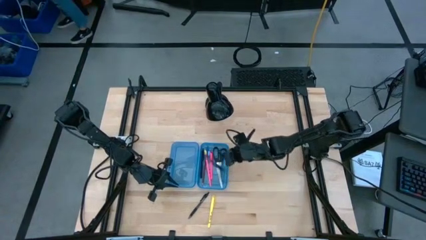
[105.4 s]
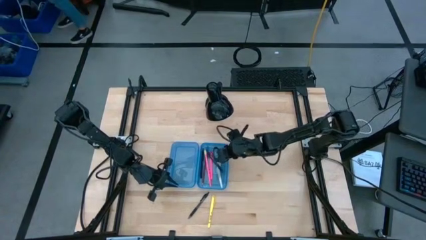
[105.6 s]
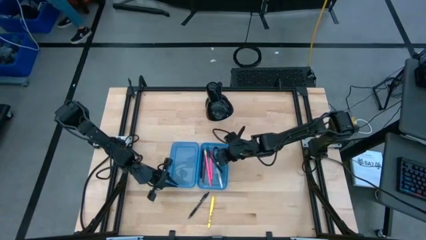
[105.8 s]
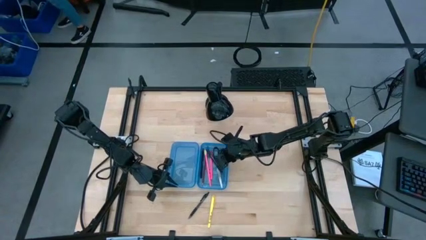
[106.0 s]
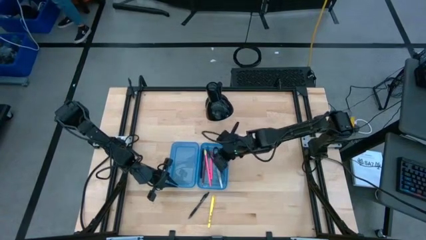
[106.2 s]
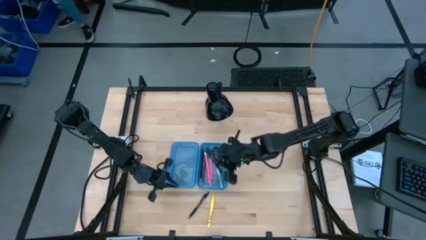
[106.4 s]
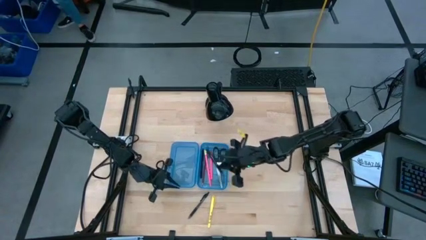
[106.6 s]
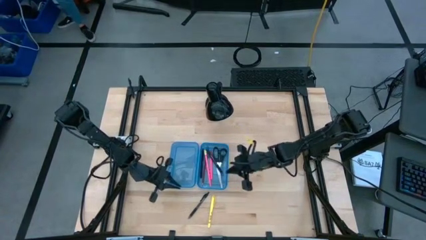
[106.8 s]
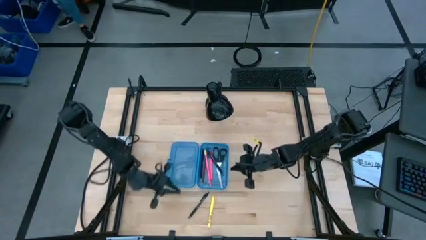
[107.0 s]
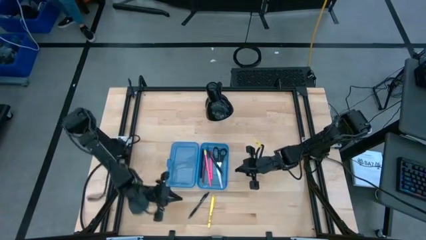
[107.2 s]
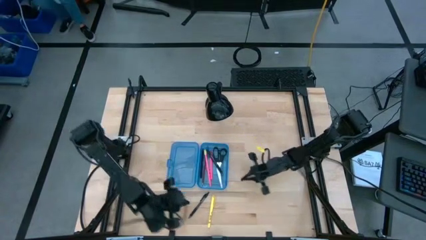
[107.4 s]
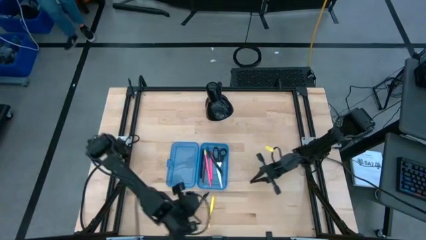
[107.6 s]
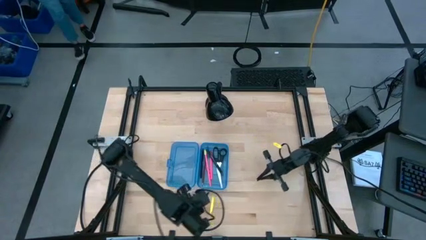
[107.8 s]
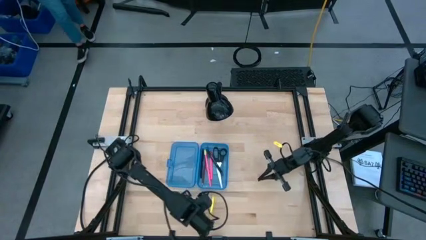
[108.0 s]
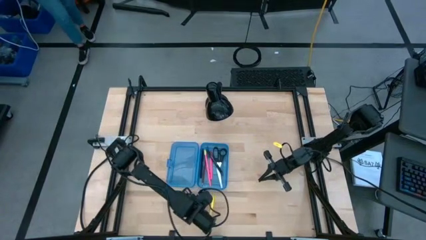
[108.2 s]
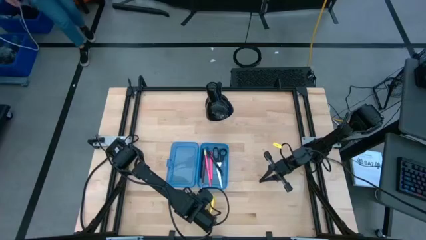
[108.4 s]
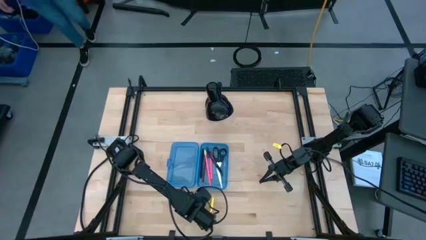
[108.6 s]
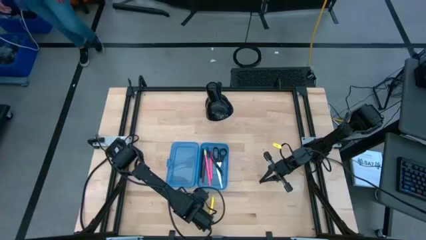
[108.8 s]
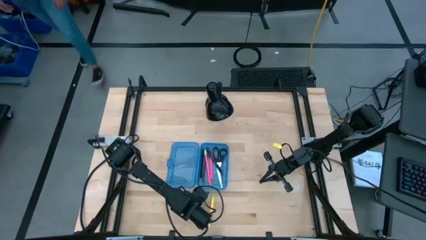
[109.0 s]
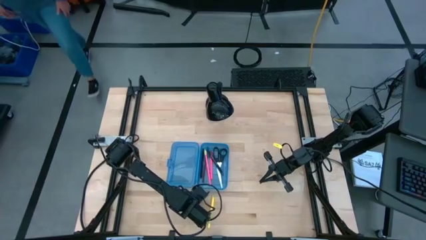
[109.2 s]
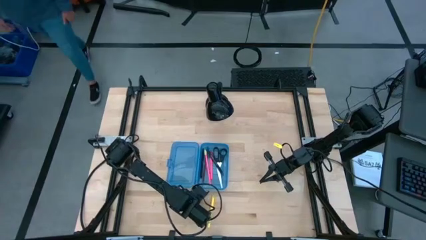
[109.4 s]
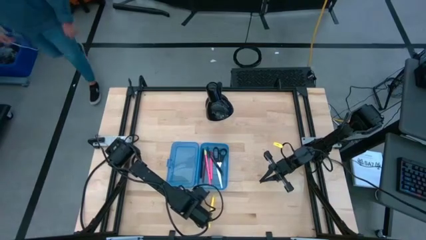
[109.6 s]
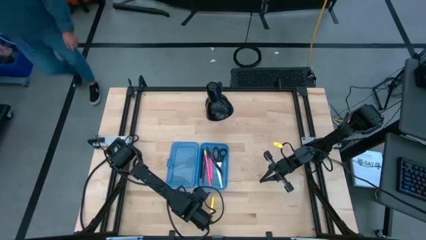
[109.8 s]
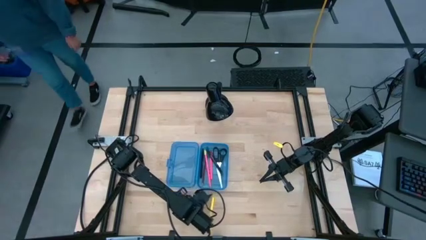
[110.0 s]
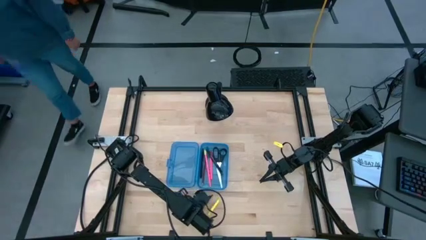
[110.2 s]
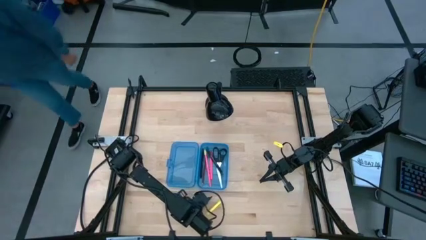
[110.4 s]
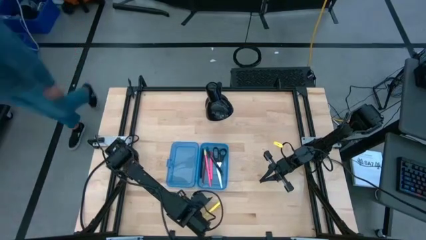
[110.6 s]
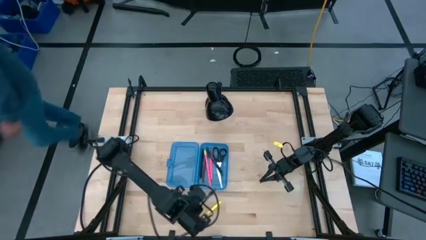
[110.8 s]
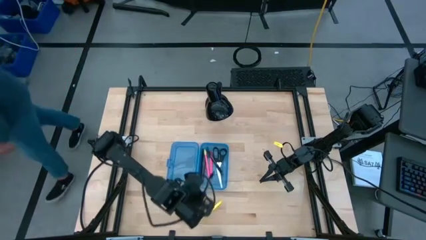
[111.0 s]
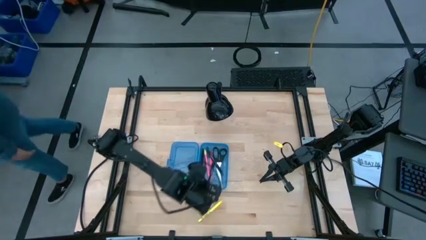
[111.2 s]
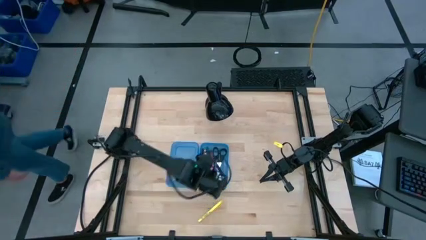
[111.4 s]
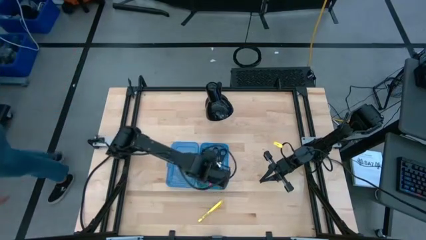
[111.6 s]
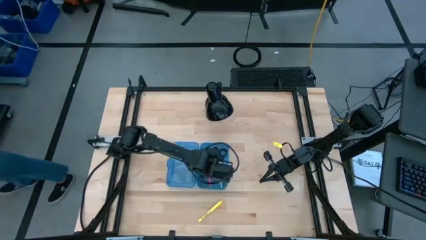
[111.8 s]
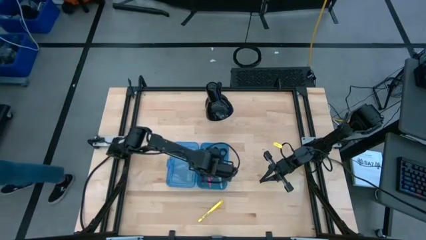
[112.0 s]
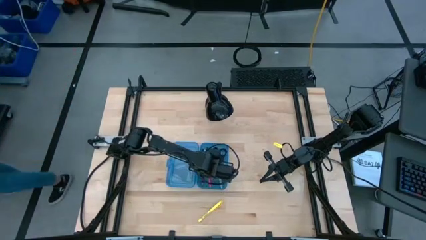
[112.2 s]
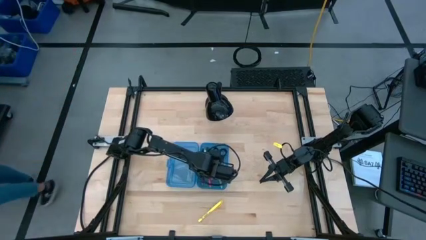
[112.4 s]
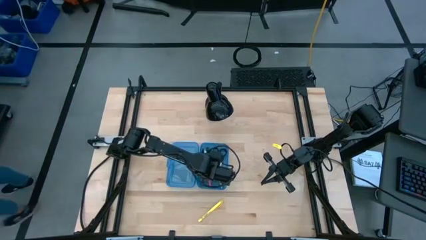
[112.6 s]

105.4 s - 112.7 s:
Task: Pick & place school supplies into a supply box
Put the black pen into the blue supply box

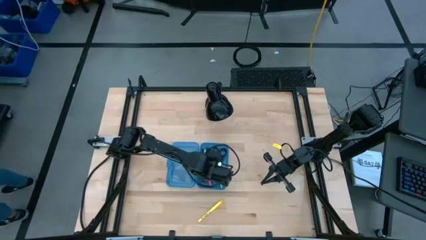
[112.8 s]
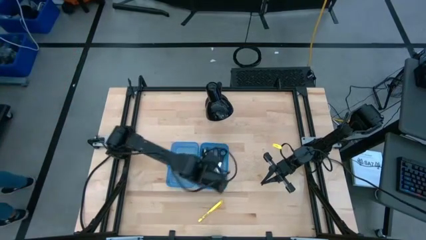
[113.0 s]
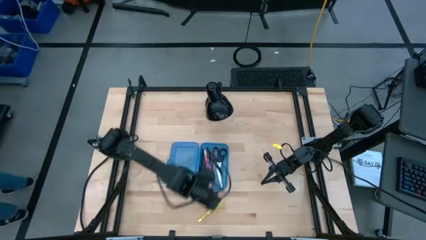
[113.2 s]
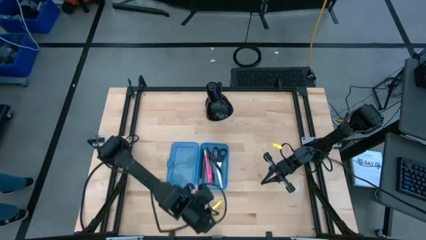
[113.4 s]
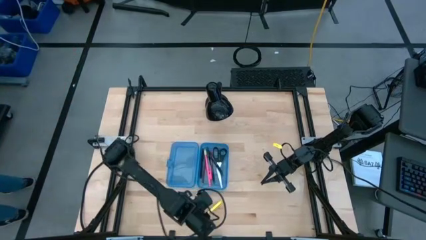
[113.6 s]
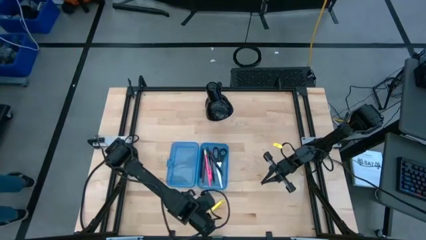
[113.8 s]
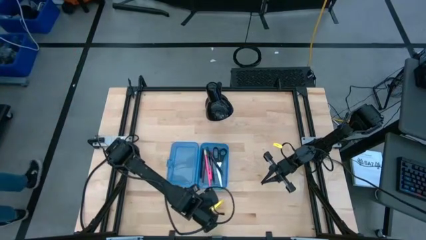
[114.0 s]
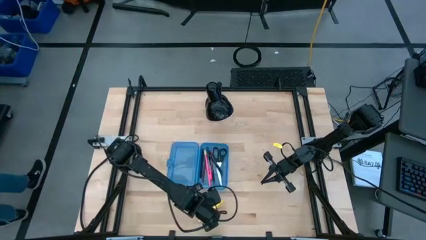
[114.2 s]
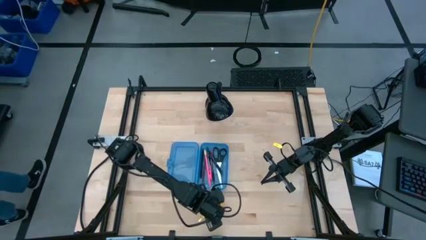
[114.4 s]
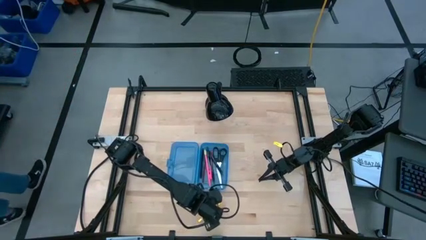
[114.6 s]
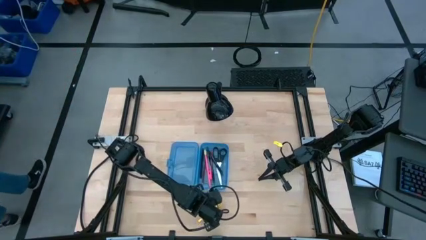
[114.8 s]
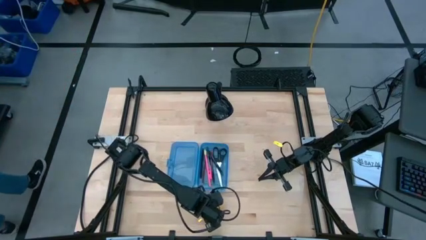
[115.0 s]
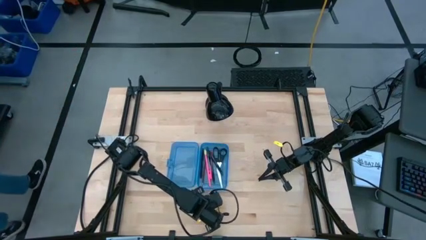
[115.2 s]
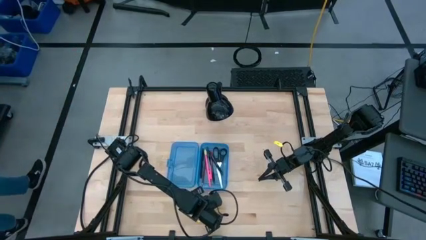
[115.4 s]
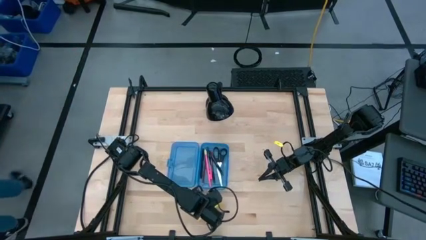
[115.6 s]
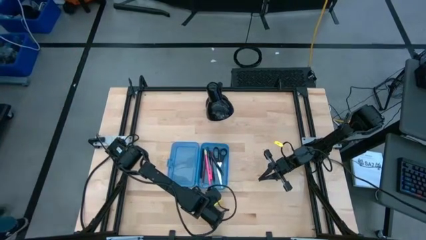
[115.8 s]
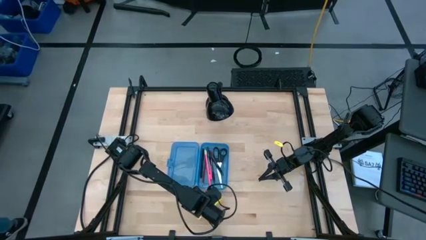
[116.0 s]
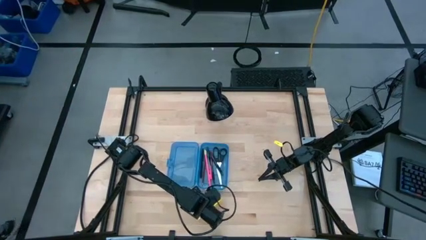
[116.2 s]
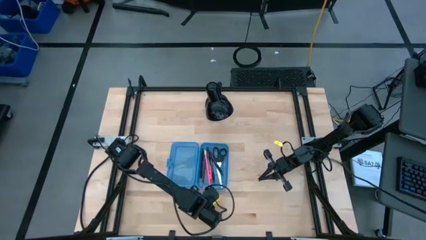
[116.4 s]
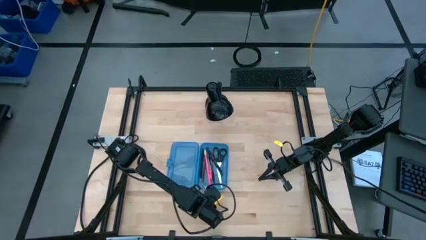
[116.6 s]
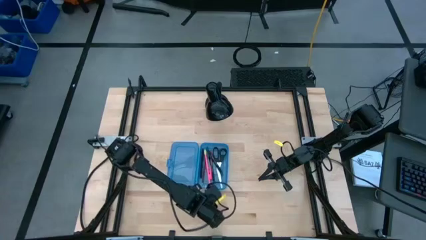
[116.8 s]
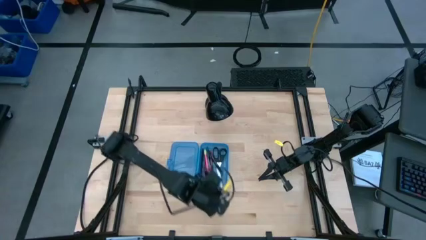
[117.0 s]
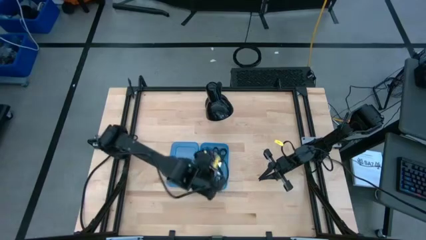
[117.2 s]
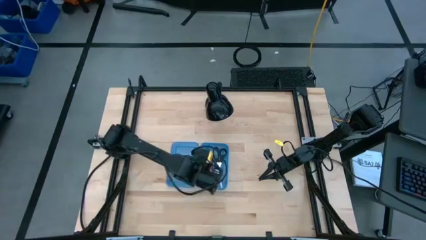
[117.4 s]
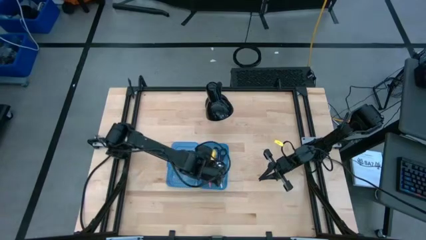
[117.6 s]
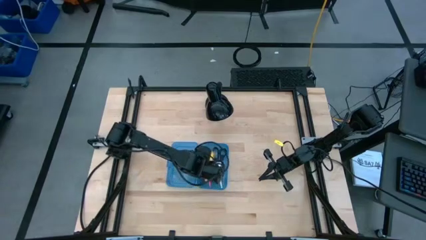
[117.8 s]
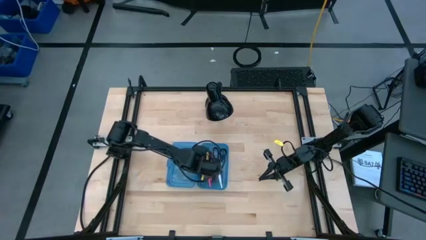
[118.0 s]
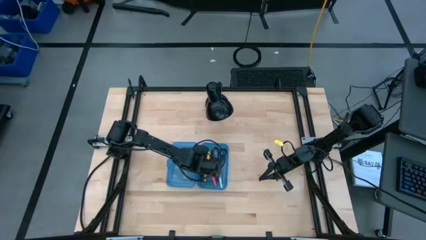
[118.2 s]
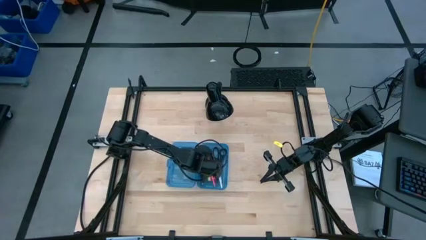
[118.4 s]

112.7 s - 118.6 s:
Put the yellow pen into the blue supply box

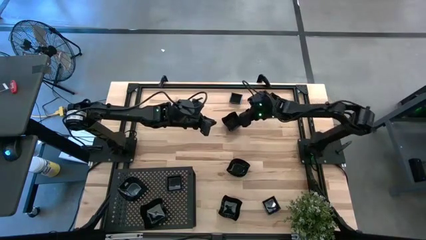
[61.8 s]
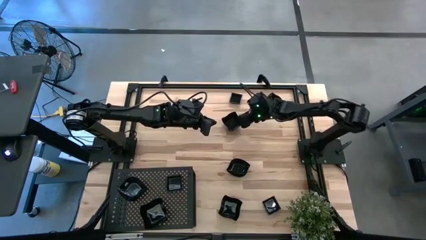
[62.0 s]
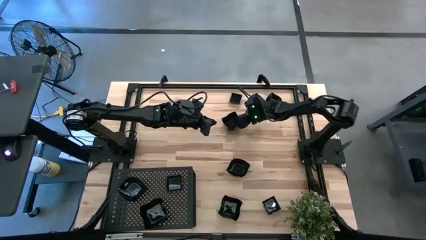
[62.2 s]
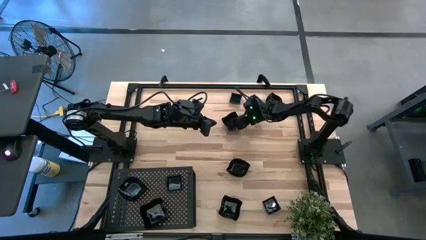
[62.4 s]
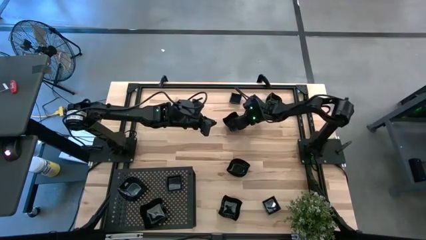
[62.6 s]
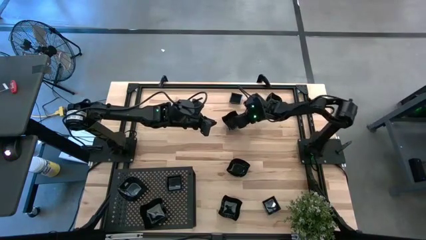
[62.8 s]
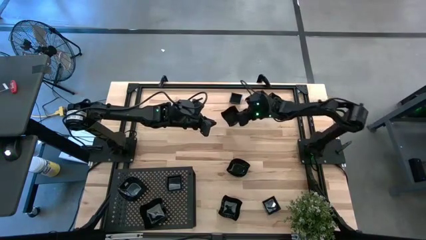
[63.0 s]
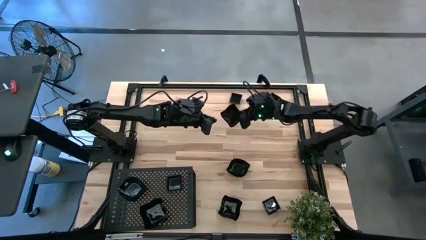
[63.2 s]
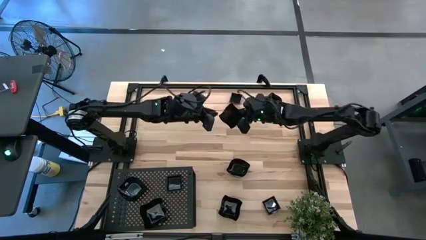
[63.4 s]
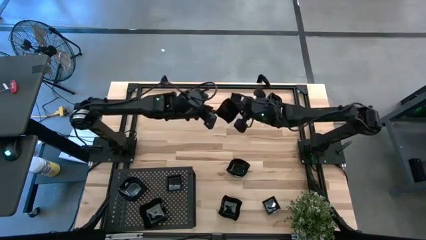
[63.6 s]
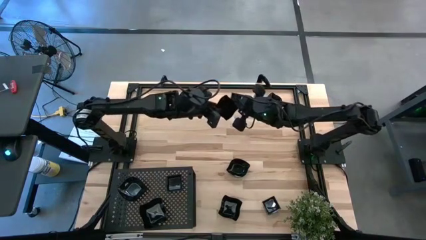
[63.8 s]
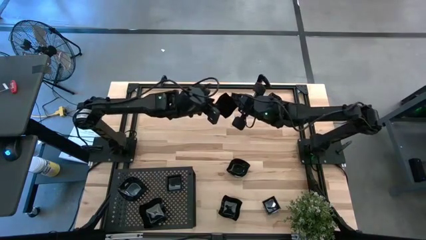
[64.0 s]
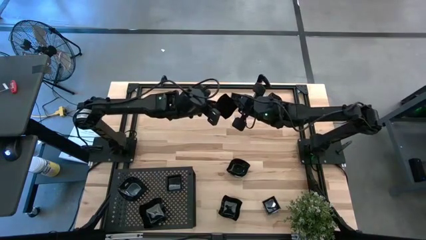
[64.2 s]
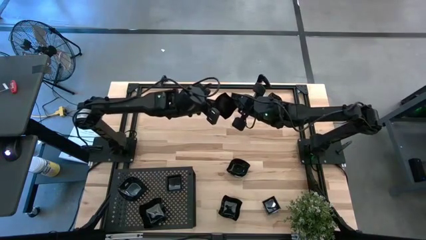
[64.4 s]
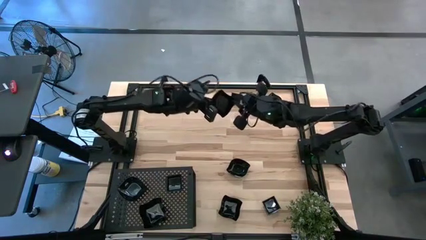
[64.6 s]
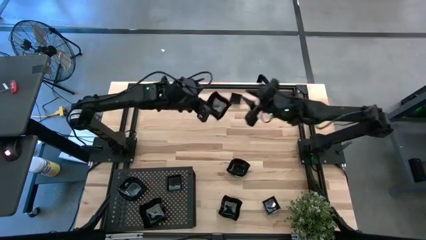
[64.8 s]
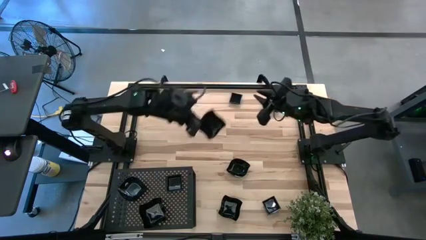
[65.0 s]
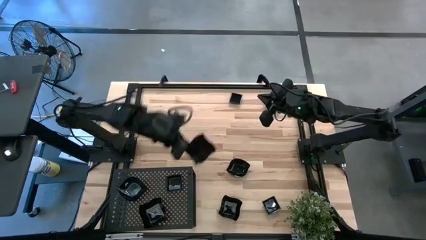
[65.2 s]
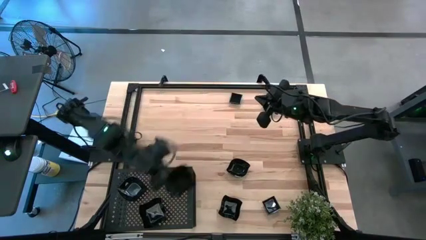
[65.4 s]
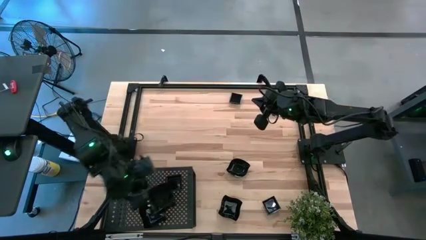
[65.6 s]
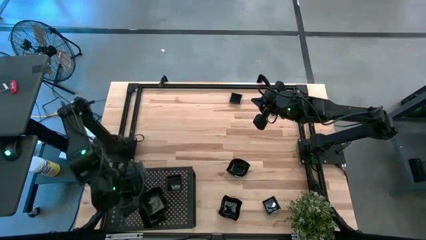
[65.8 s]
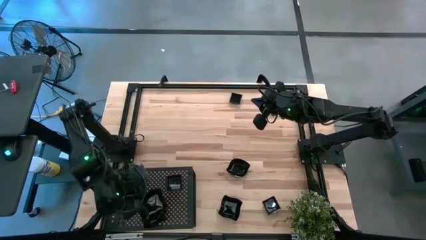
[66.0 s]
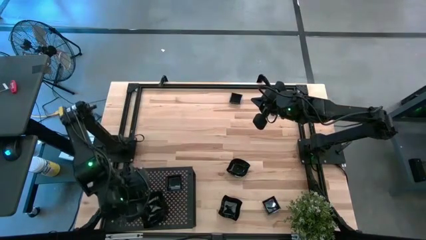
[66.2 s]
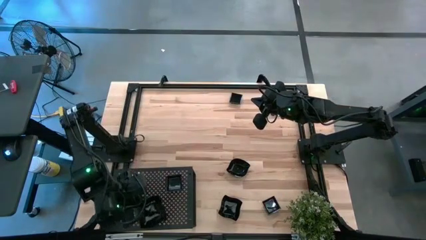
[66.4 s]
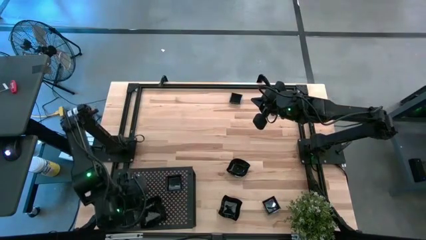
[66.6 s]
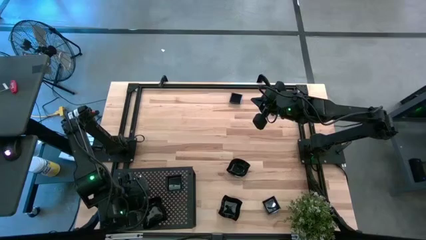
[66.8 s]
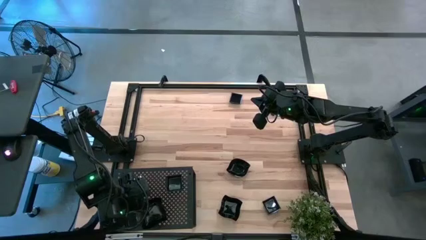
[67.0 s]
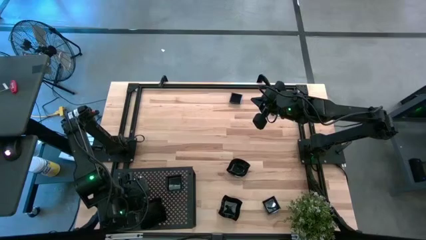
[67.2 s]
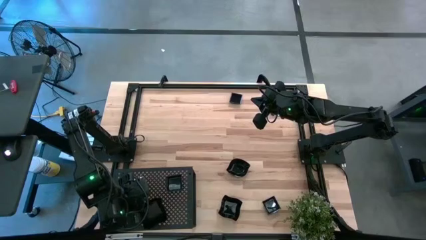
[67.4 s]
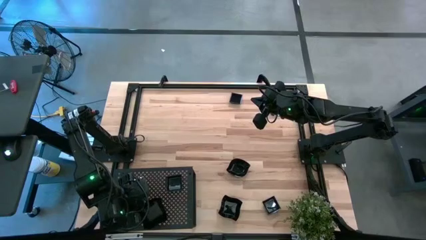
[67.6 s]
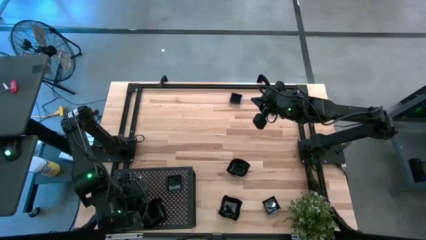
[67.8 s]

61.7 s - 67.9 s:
Task: Pick & Place Mini shaped plates
Stack the distorted square plate on top of the distorted square plate on the shelf
